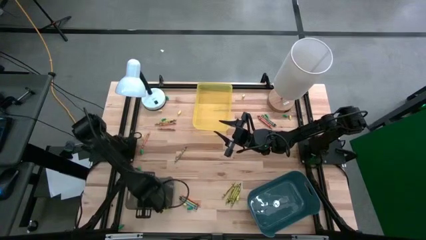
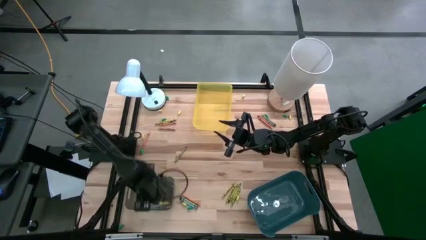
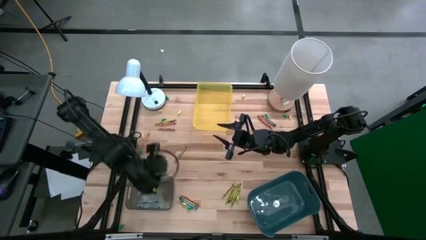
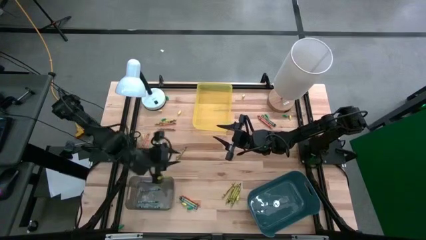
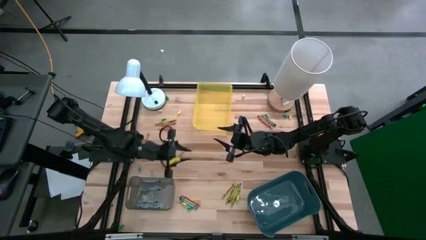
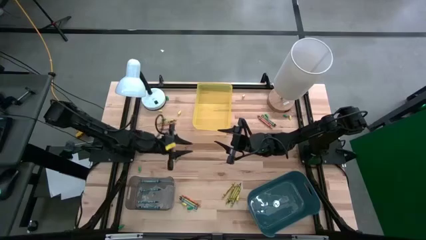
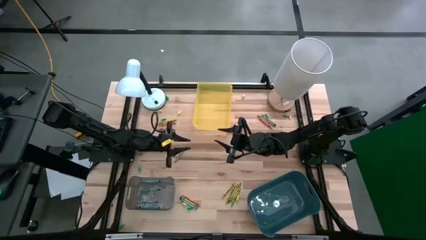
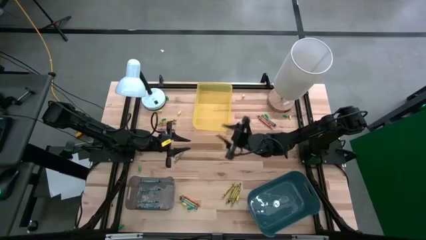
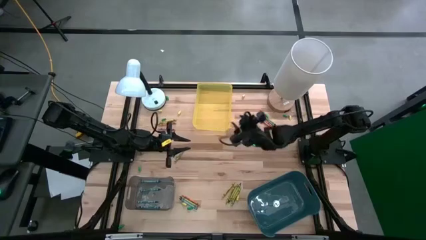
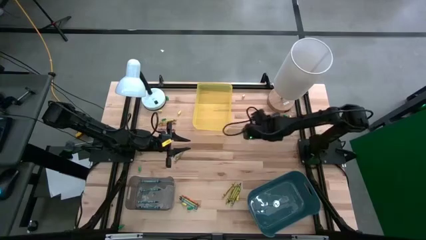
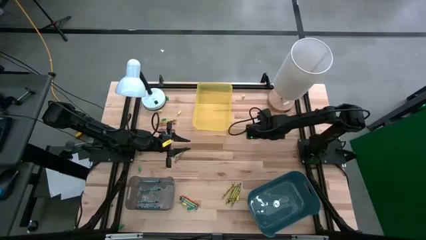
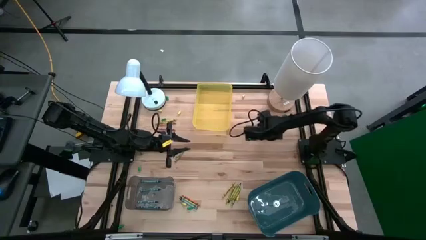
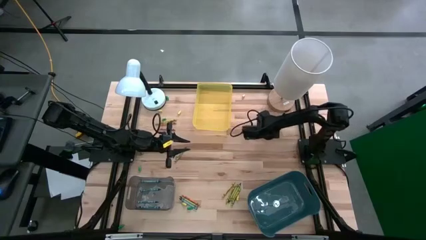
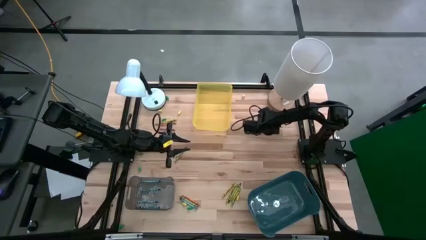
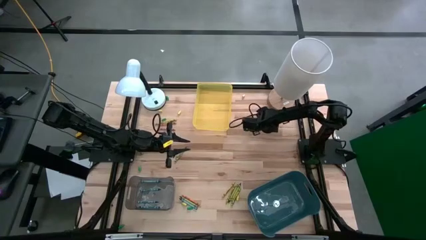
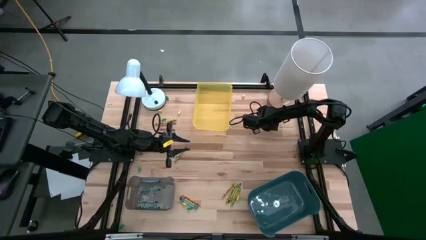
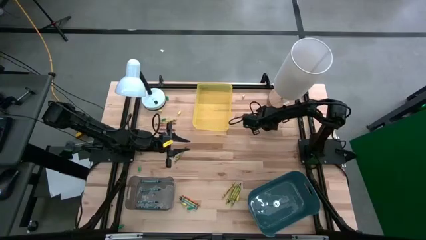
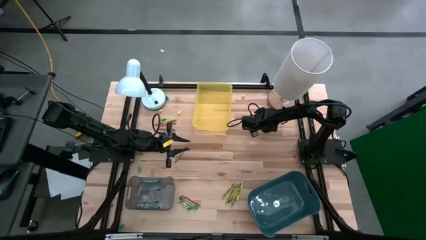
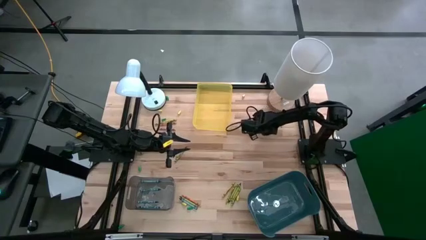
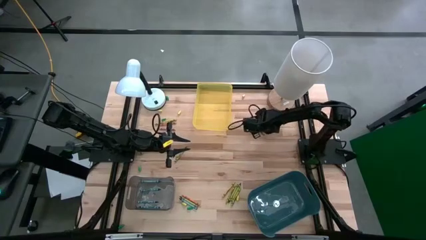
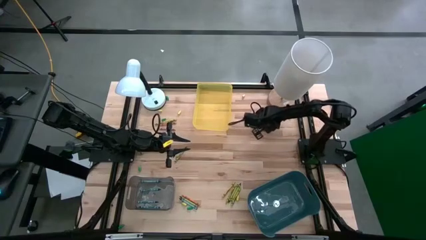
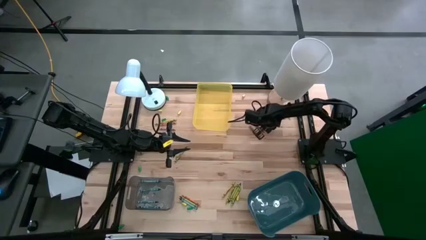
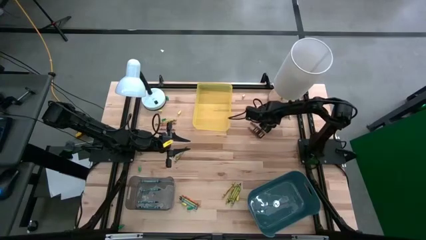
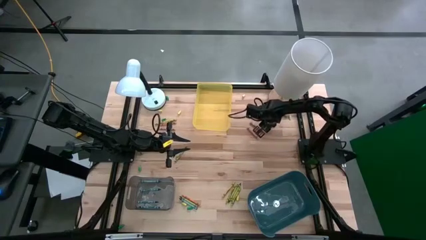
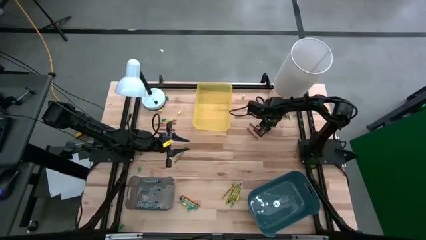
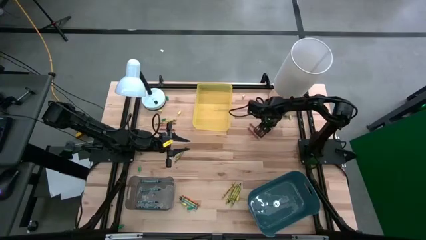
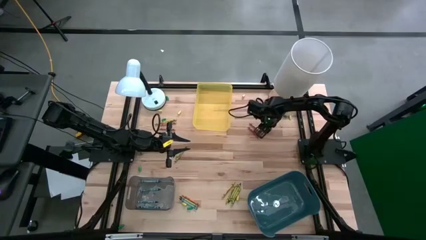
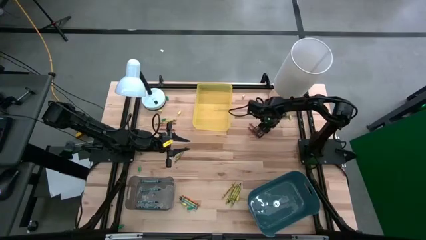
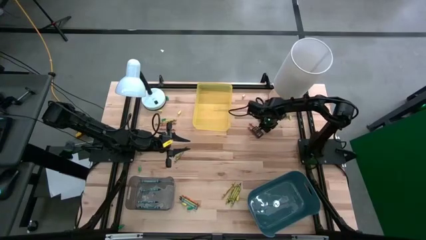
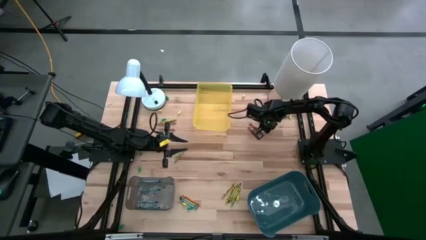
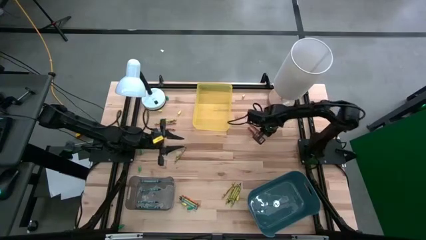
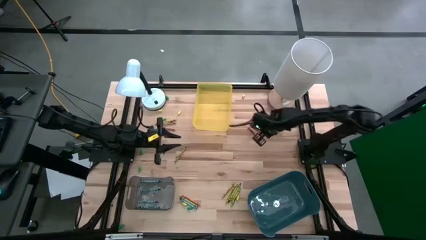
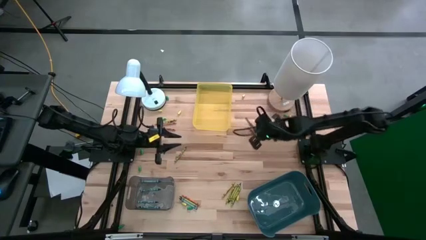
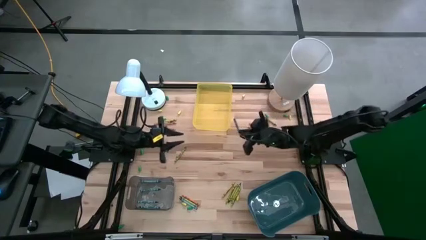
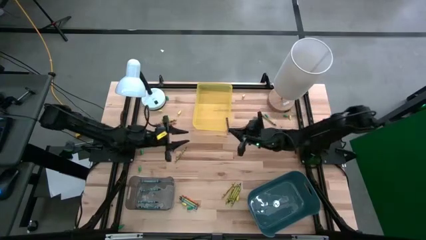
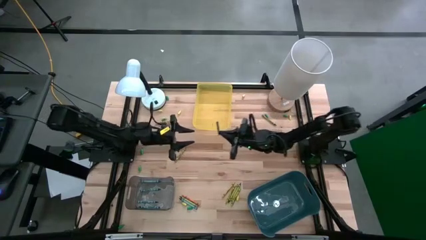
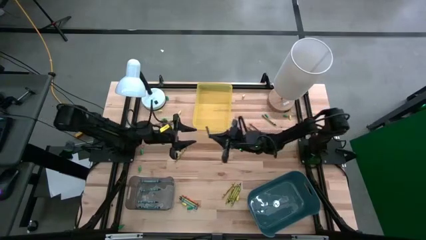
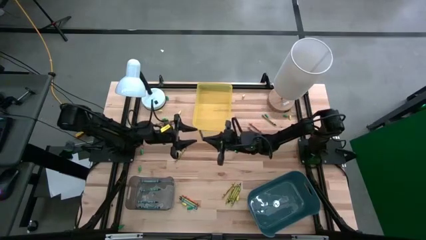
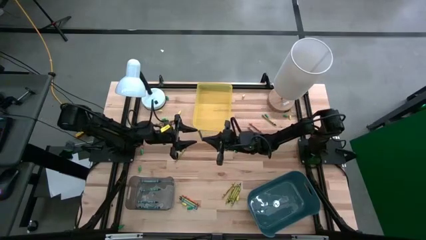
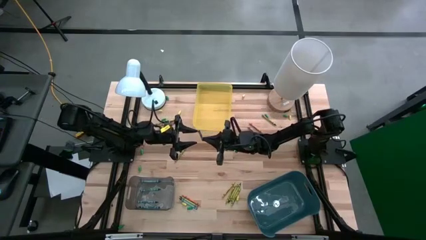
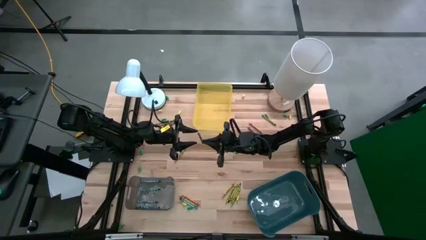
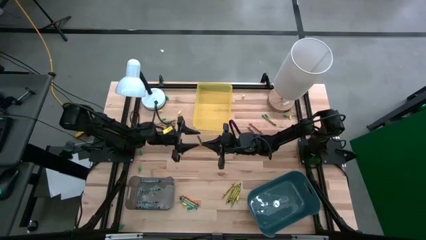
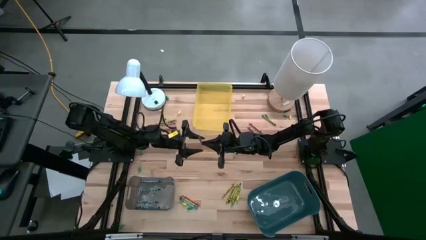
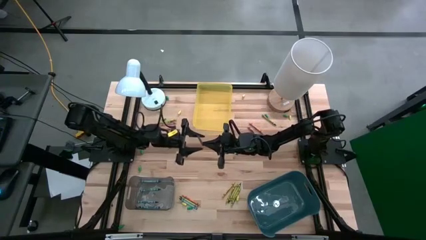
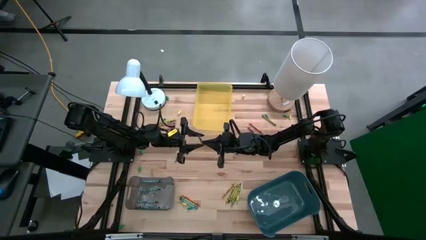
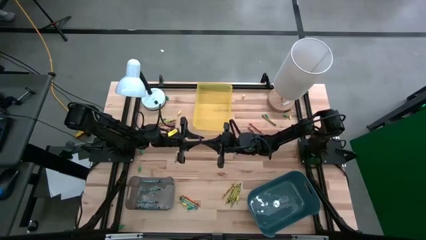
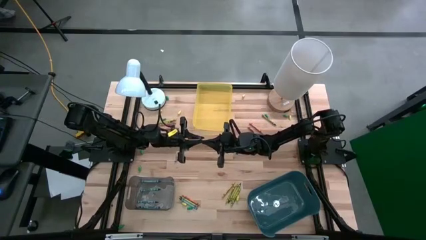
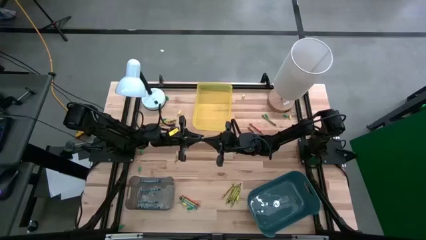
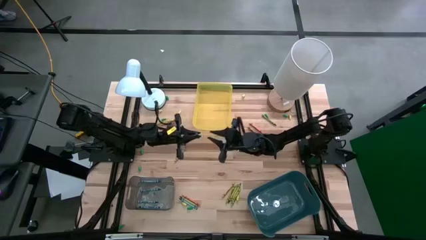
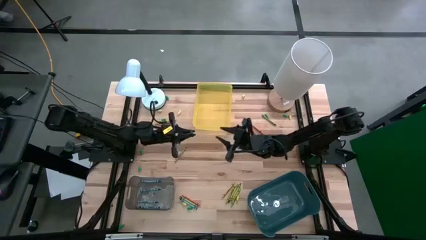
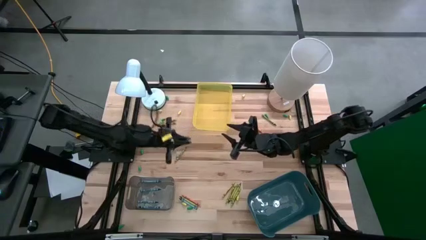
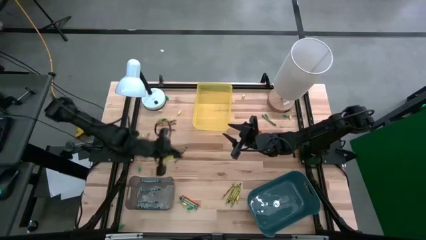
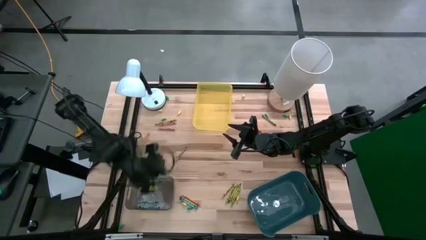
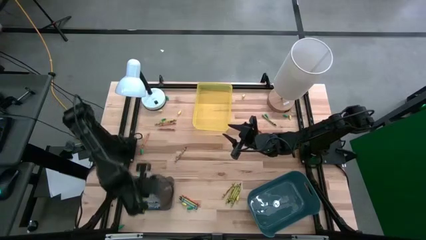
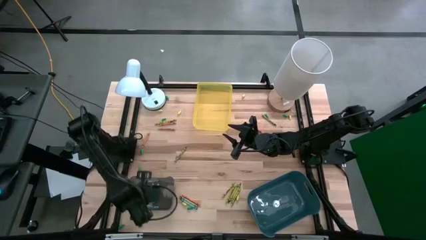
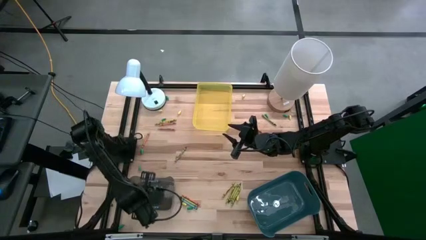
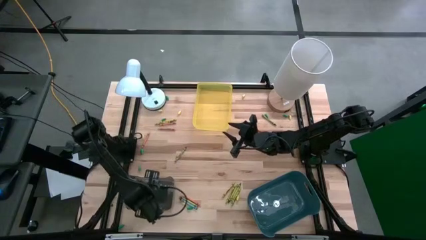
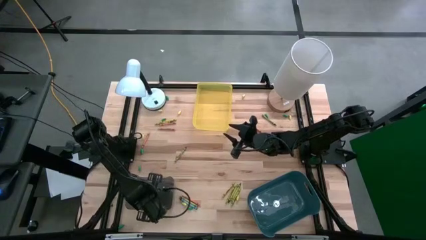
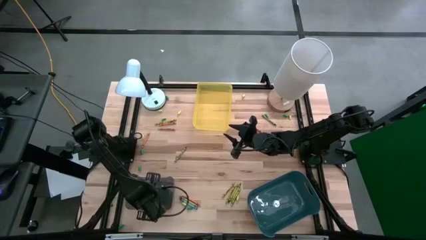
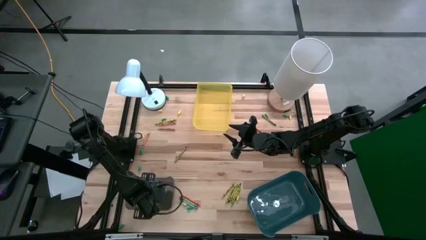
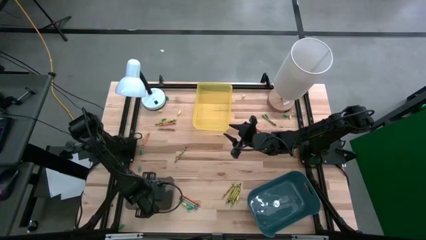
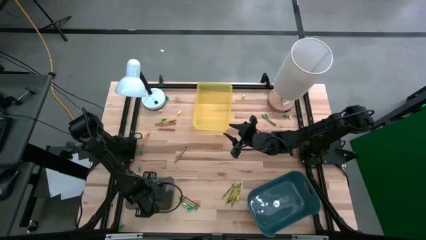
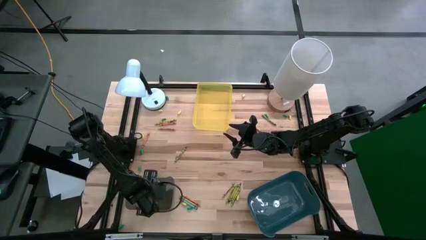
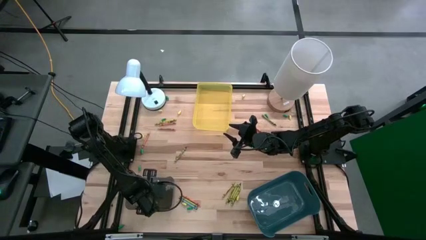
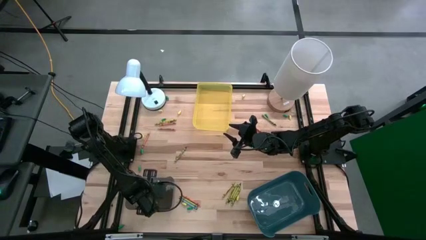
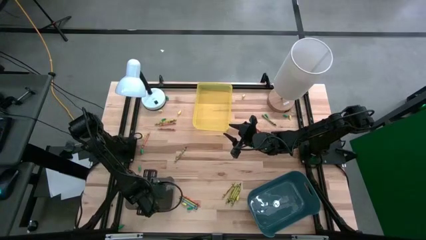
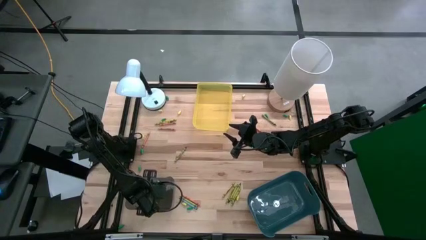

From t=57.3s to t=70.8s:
Task: Sort crayons
Put the blue crayon into the black bin
